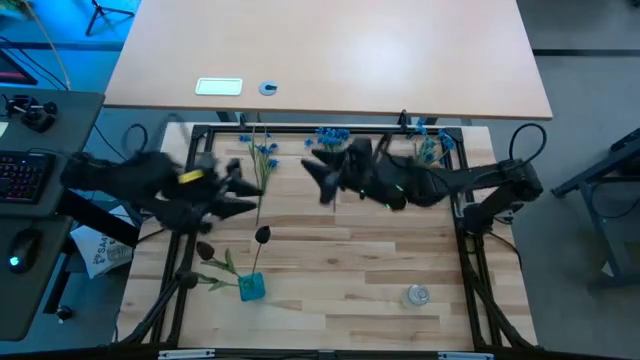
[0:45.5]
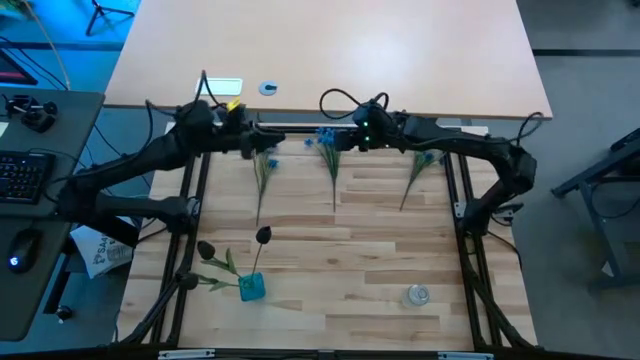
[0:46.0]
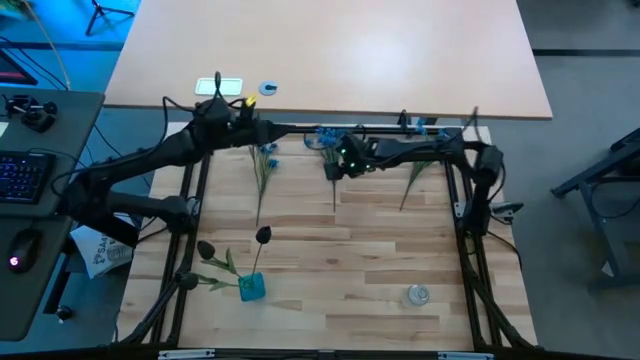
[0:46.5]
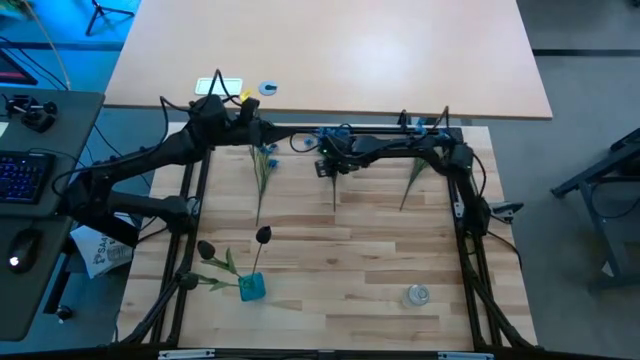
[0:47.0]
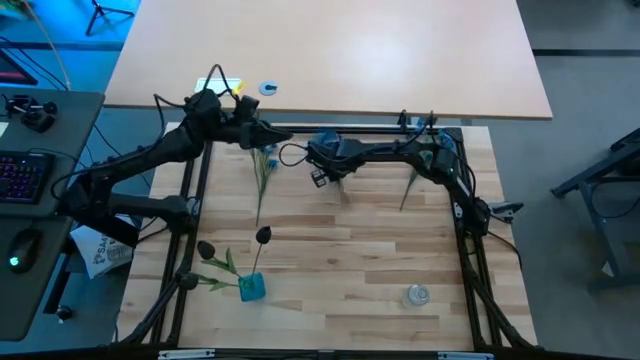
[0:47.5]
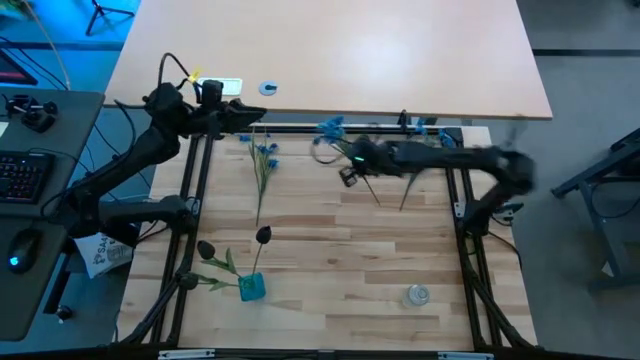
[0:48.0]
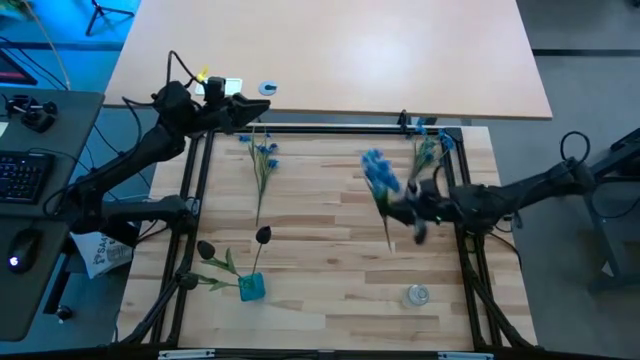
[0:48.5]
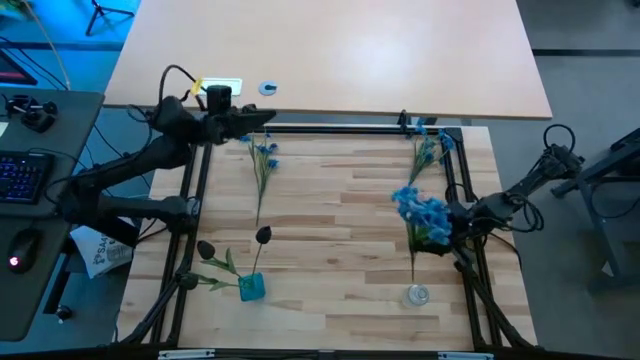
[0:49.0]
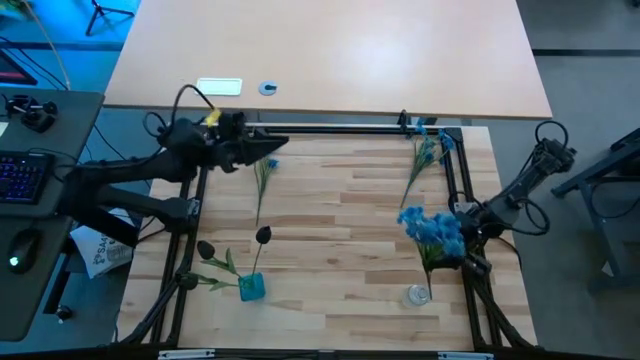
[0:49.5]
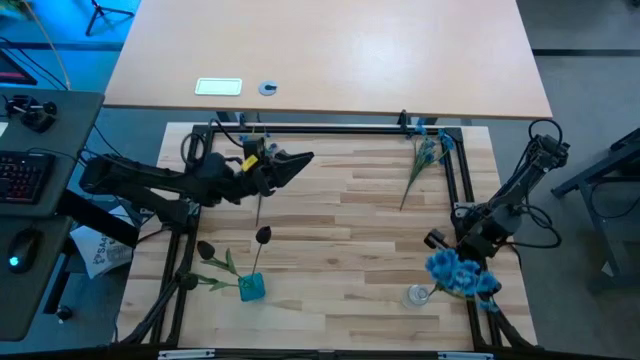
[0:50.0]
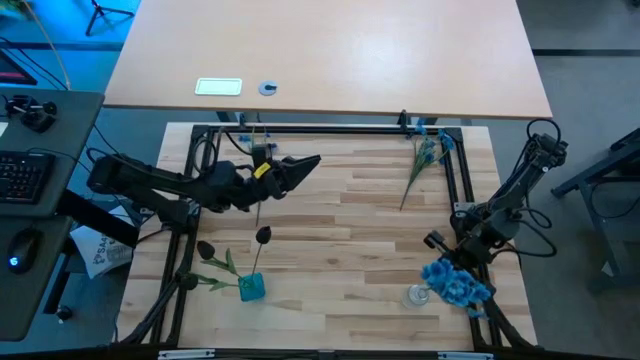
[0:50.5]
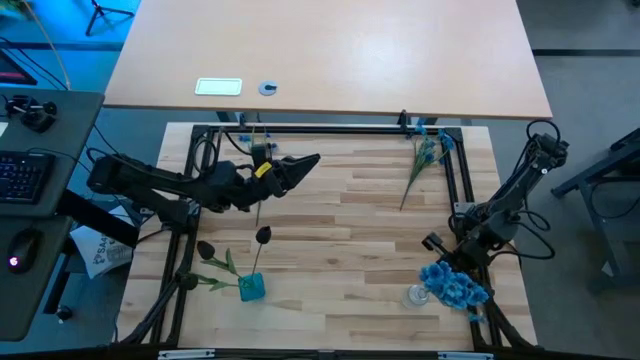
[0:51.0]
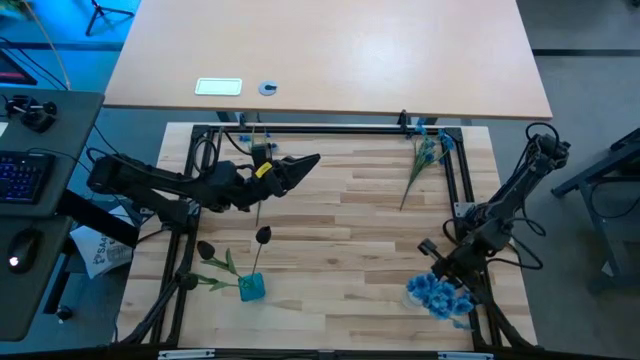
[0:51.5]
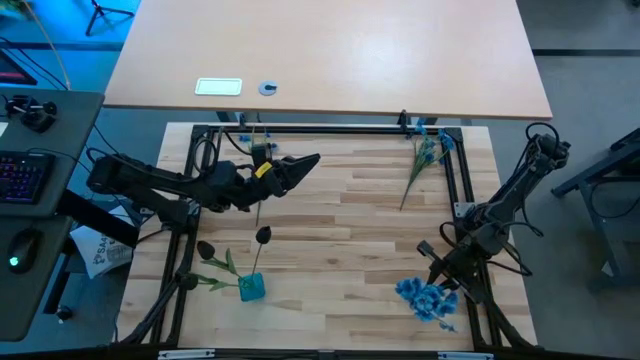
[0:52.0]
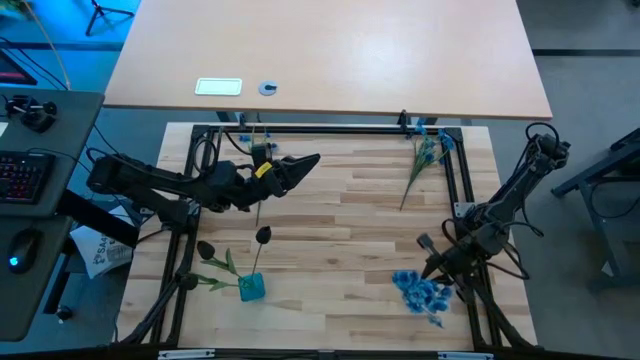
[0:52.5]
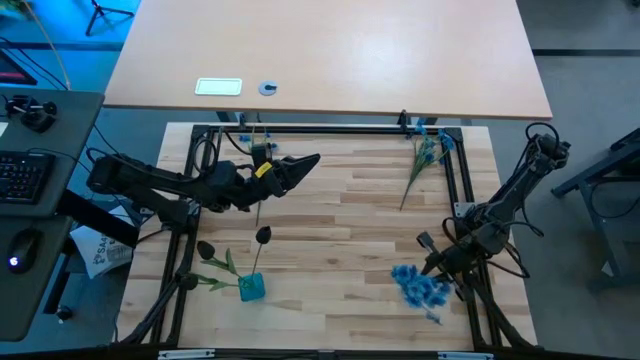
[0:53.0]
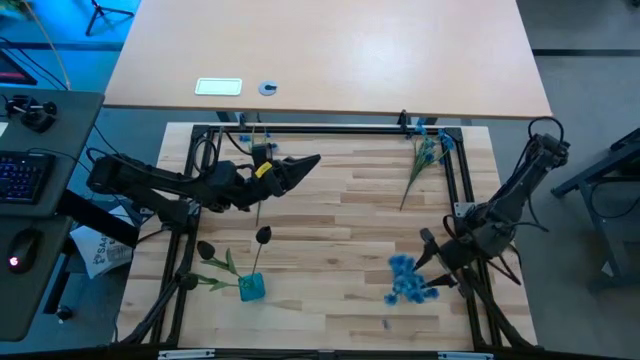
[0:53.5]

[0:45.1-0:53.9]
Task: Sort flowers into vase by color
Put the middle blue flowers into the transparent vase

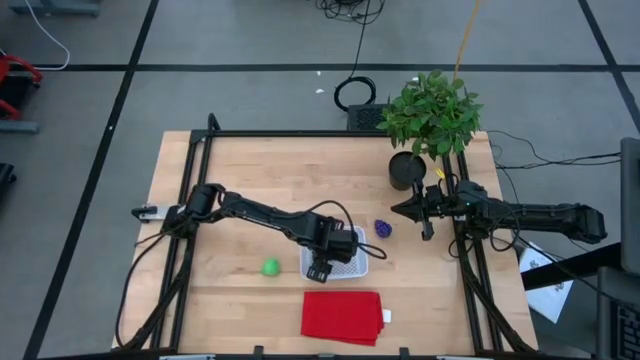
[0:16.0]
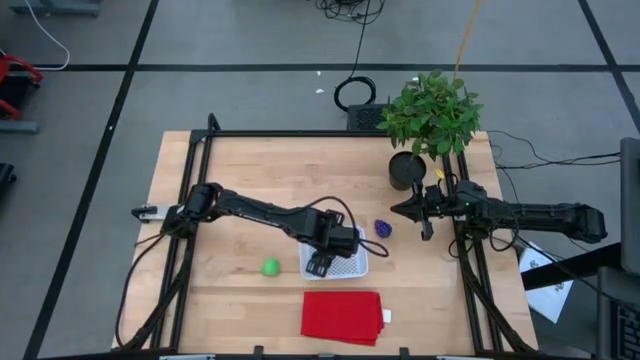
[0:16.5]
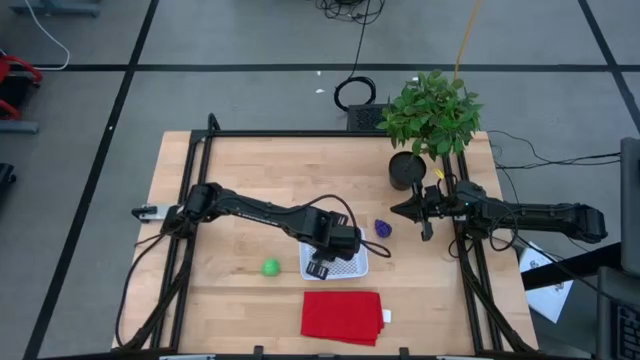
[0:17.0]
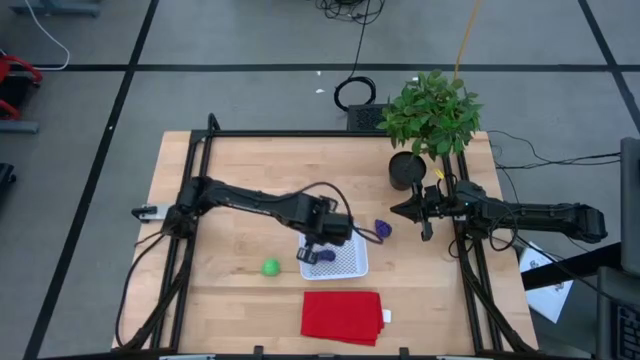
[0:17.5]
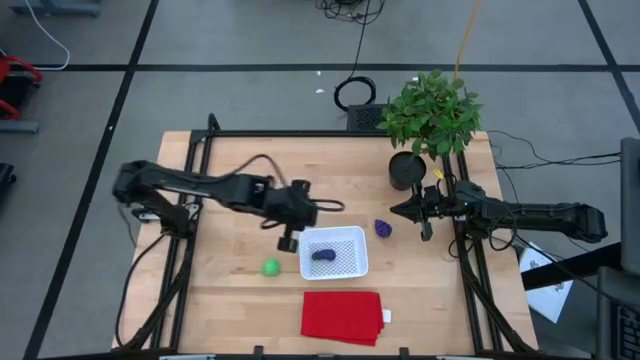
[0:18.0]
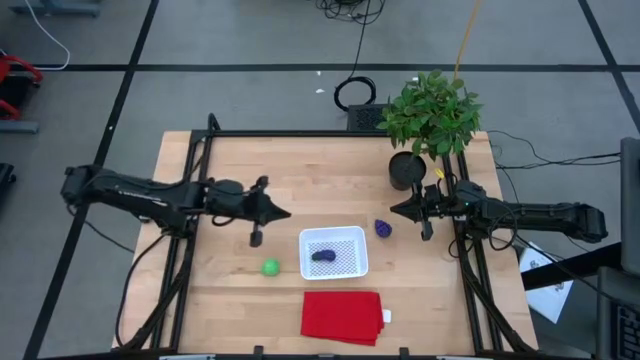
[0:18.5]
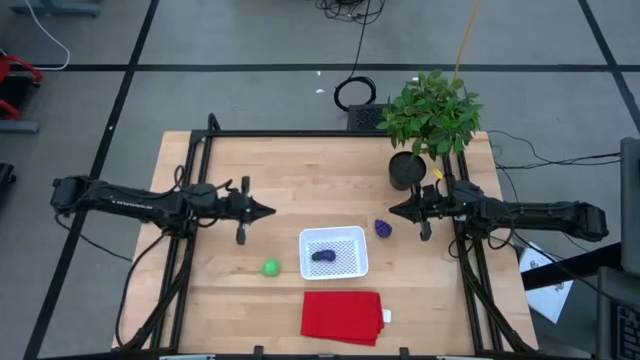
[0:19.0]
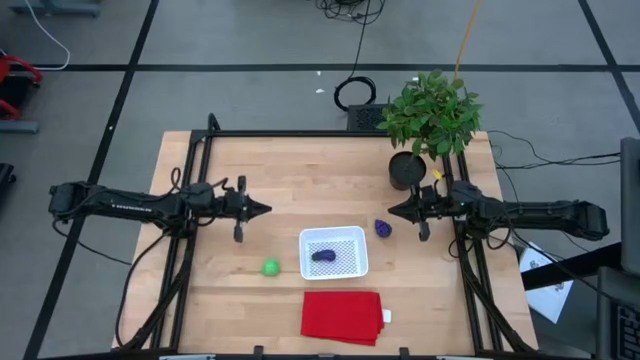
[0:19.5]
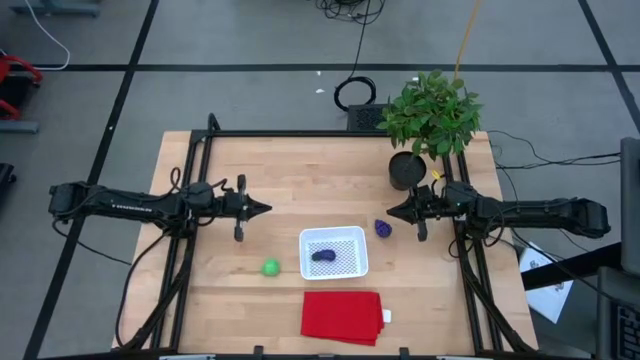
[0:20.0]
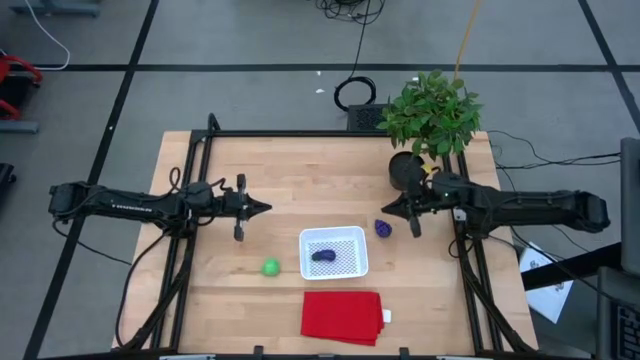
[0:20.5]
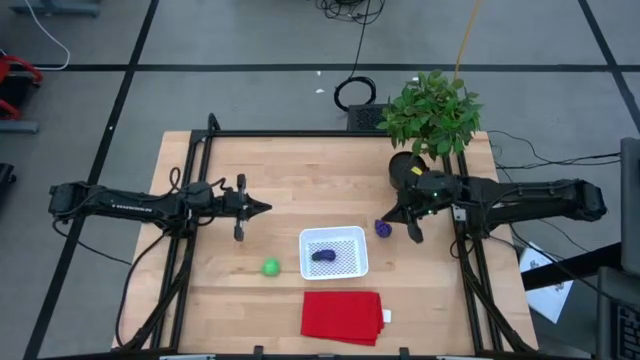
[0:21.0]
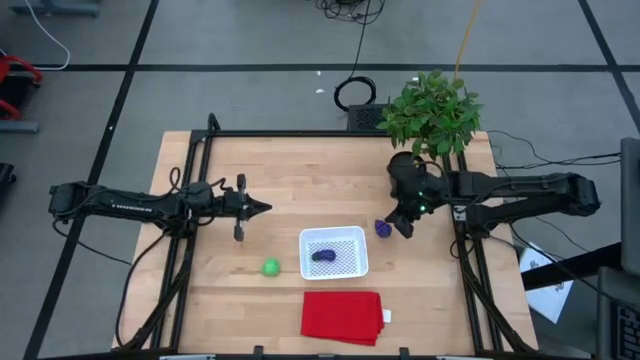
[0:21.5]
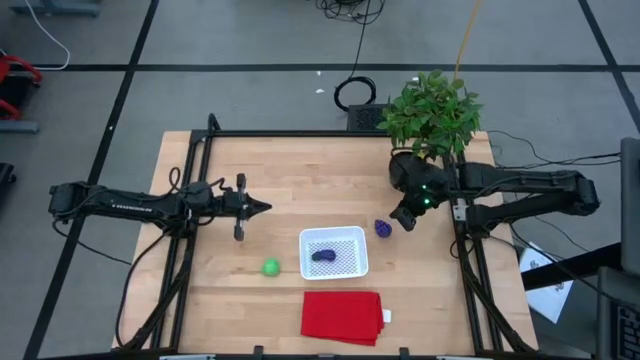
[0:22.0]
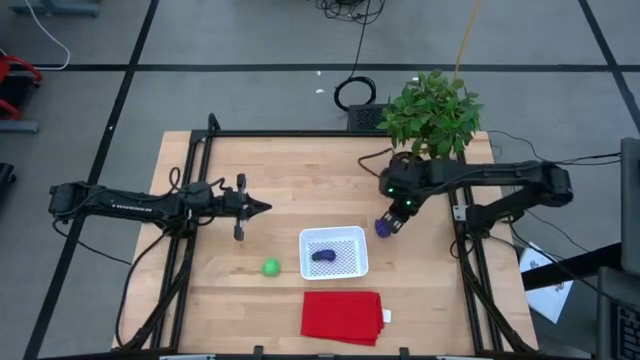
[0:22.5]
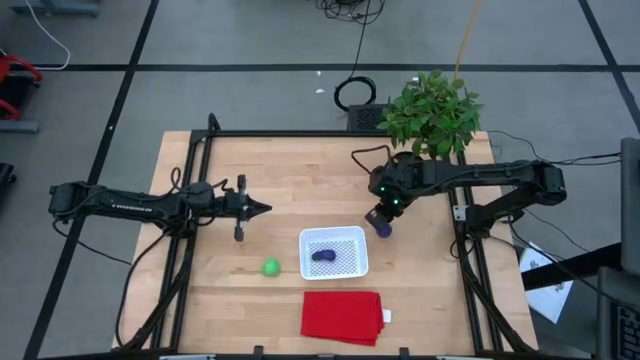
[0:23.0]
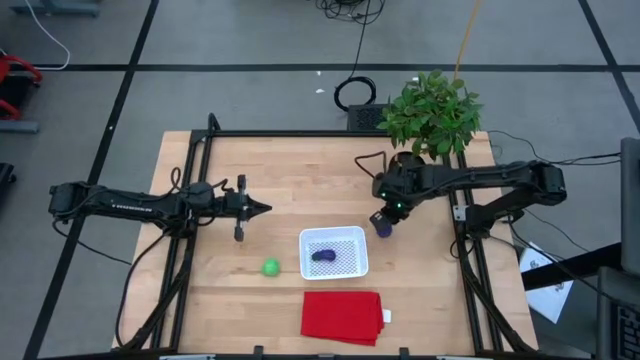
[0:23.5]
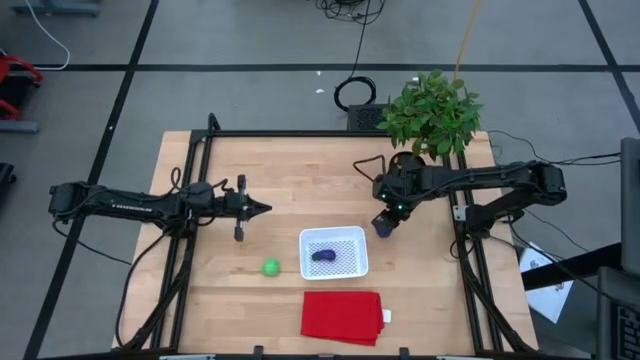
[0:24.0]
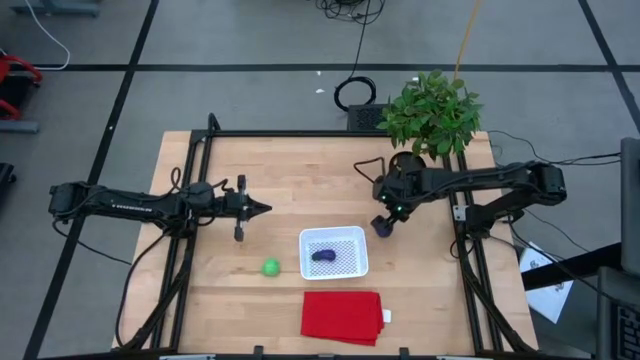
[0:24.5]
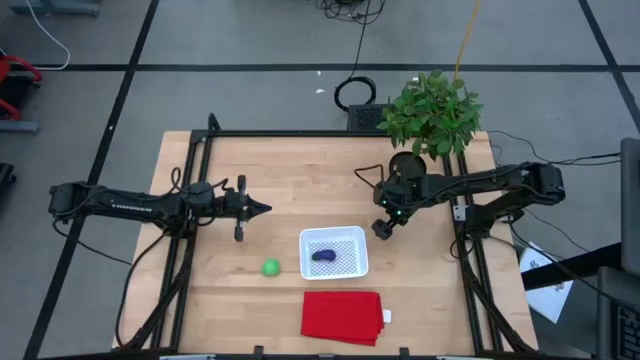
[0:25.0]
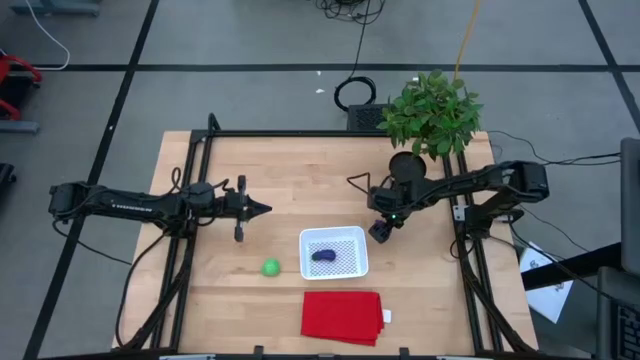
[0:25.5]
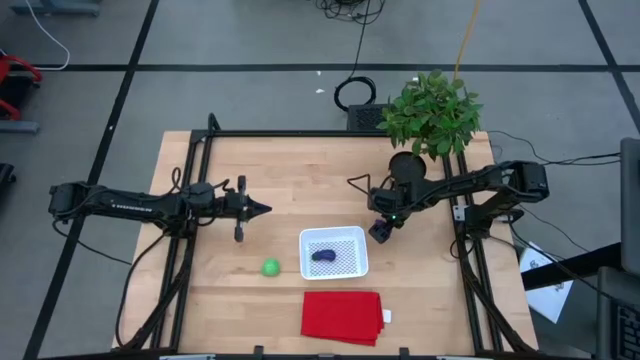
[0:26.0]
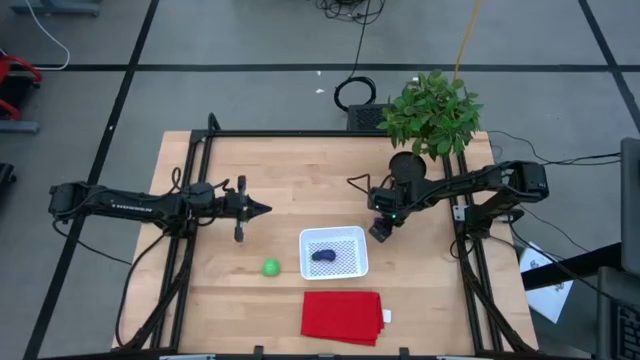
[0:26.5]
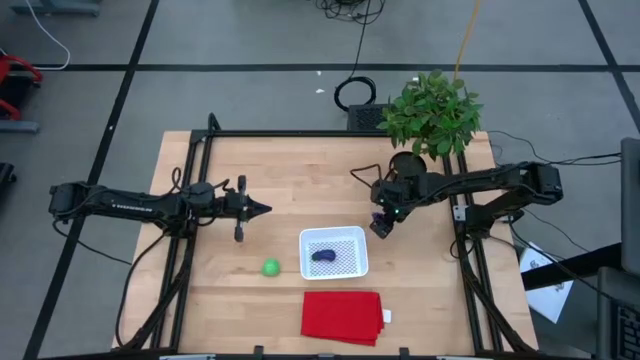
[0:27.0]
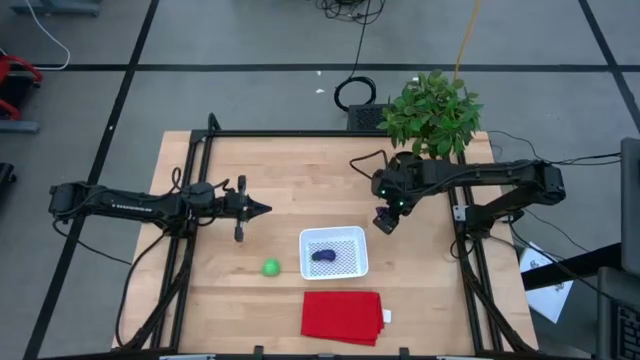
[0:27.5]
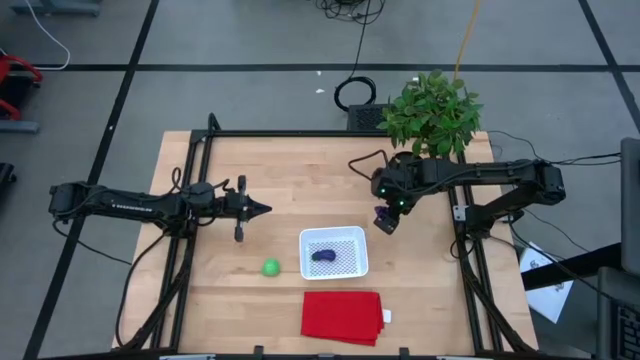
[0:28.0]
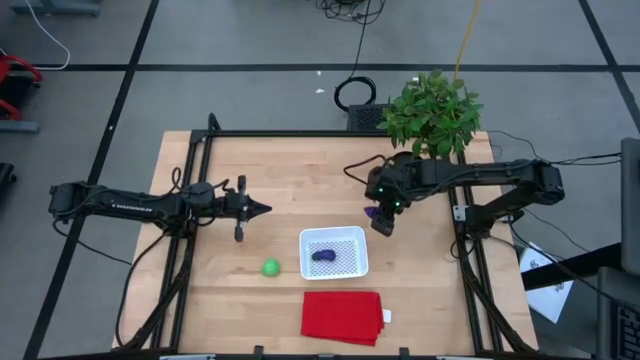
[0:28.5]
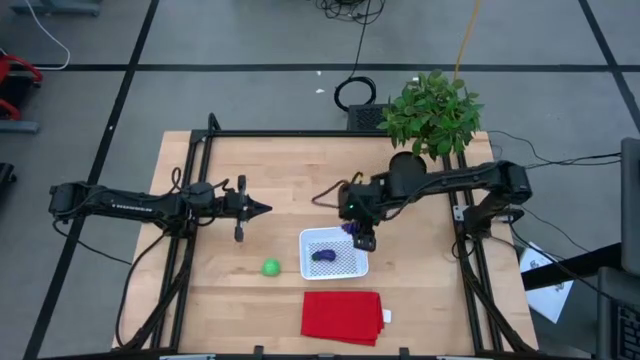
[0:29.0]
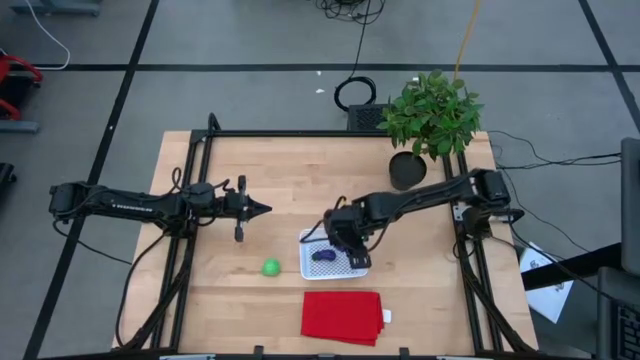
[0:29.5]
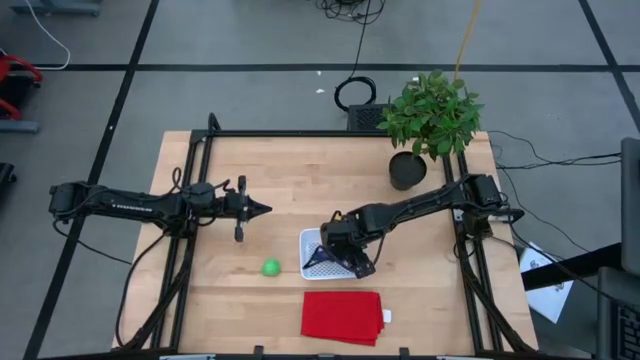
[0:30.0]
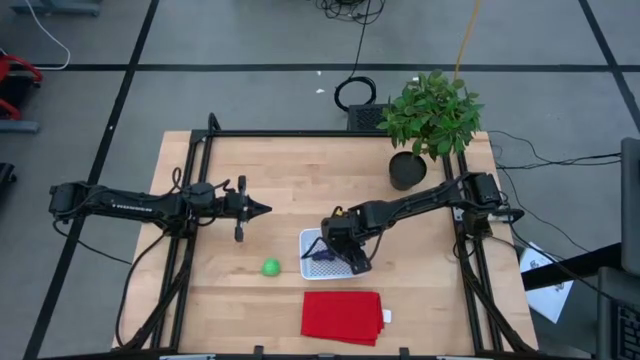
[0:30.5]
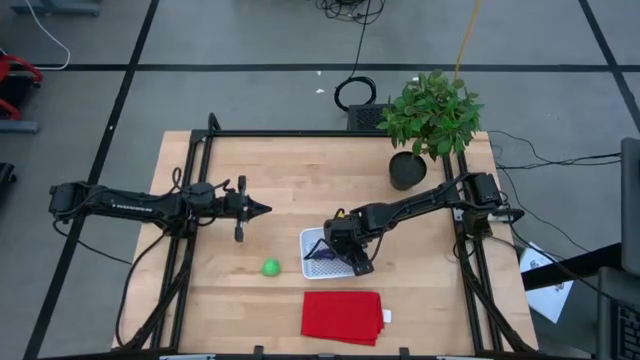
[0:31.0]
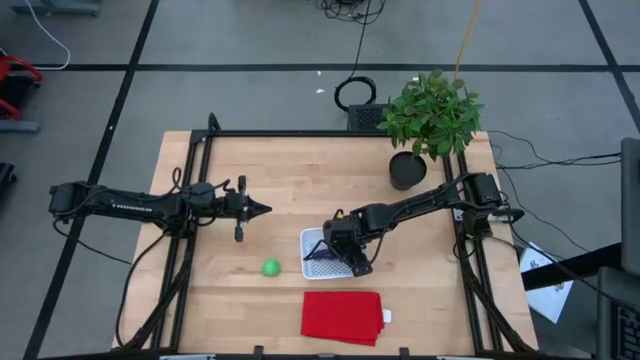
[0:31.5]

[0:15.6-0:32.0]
Task: Pick and placing Produce into tupperware
Put the grapes into the white basket
